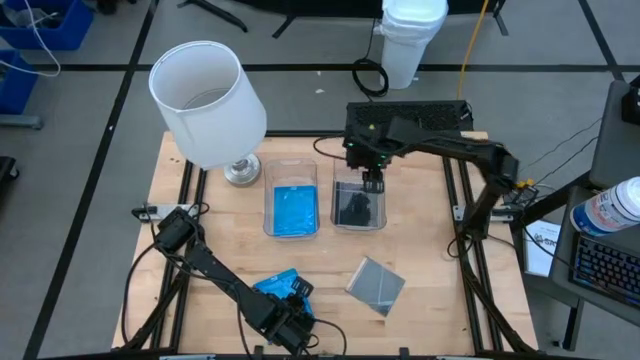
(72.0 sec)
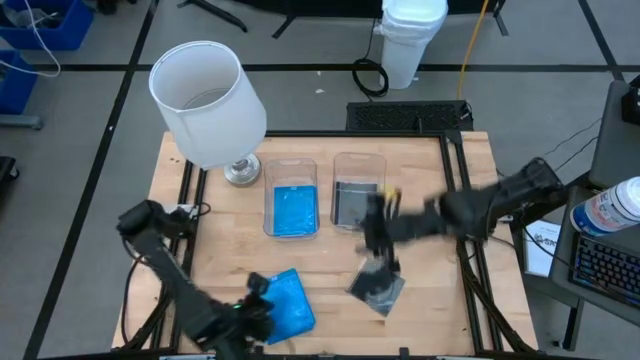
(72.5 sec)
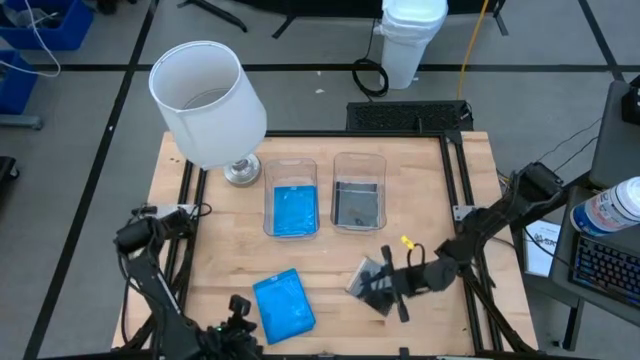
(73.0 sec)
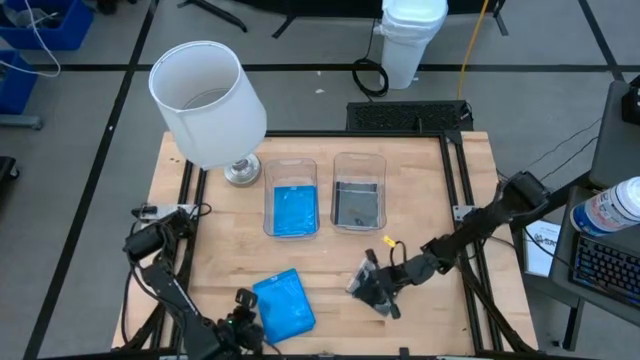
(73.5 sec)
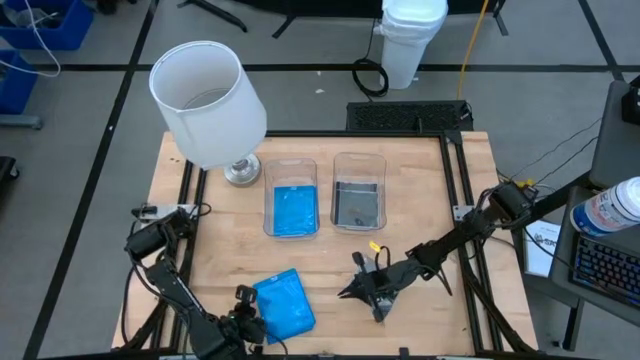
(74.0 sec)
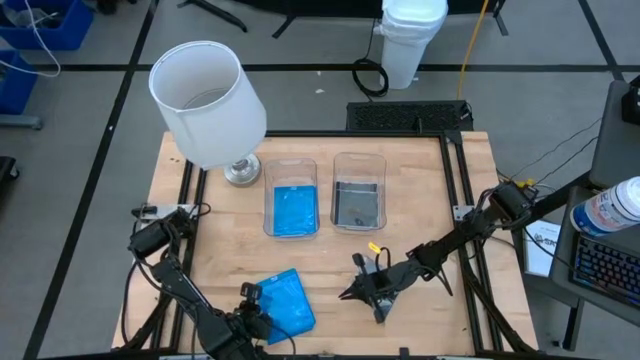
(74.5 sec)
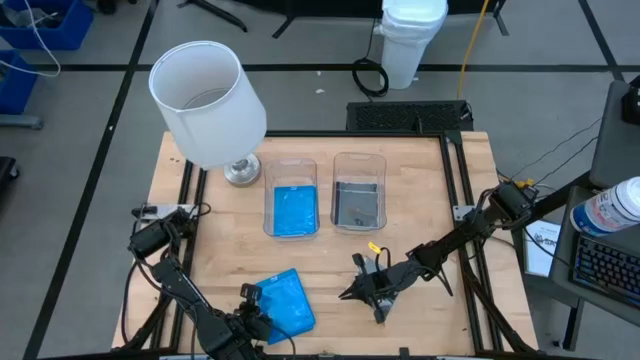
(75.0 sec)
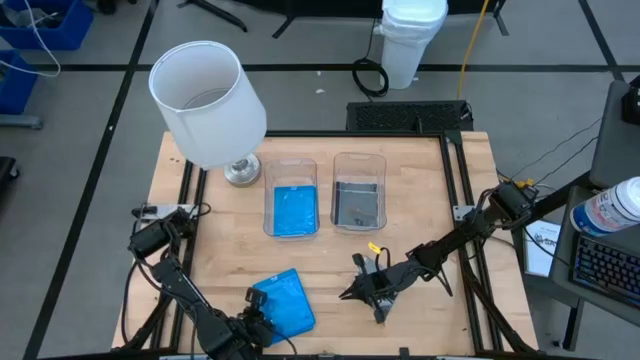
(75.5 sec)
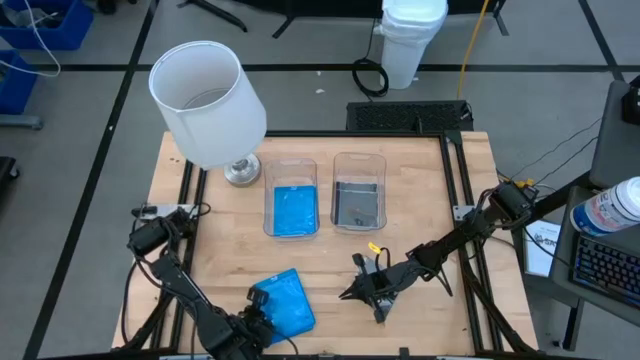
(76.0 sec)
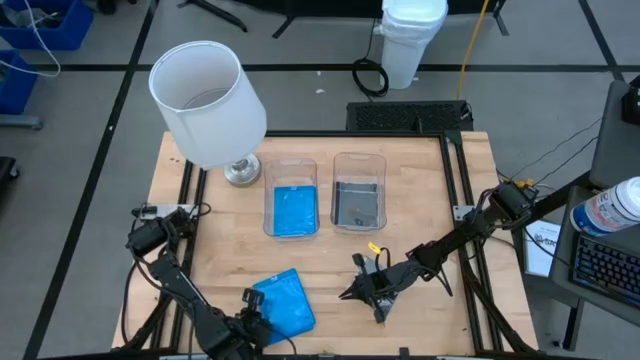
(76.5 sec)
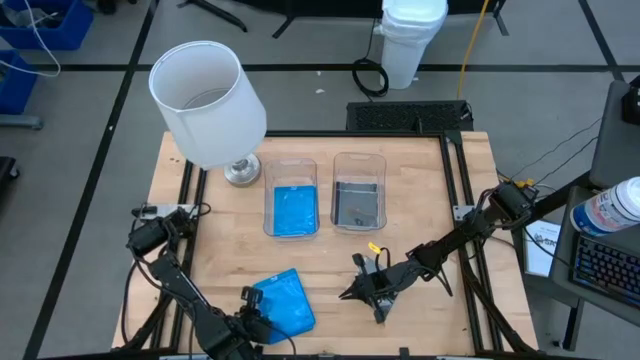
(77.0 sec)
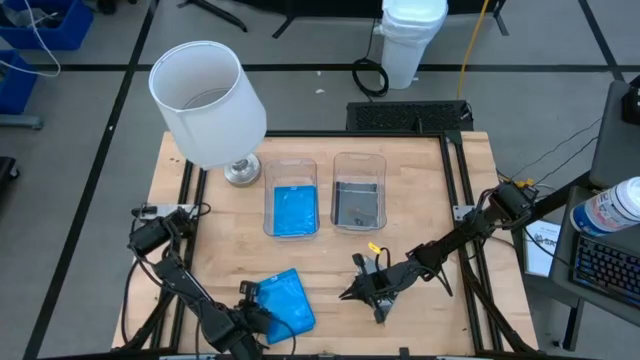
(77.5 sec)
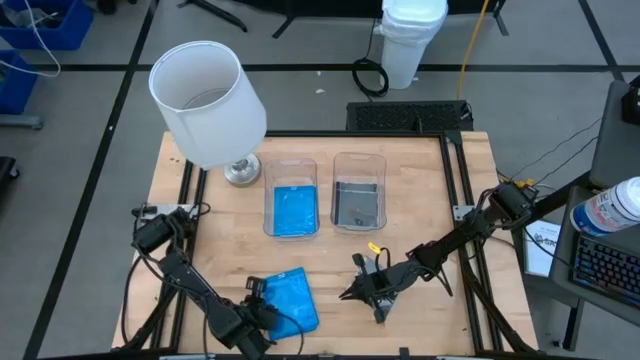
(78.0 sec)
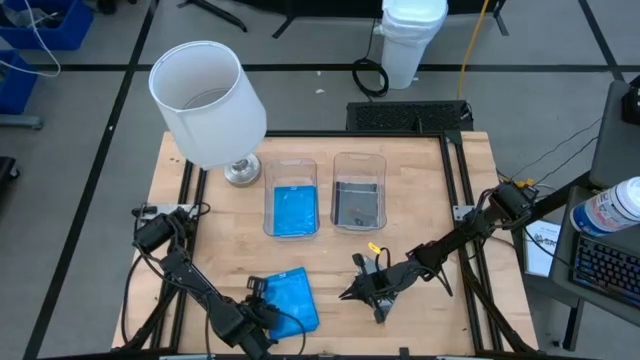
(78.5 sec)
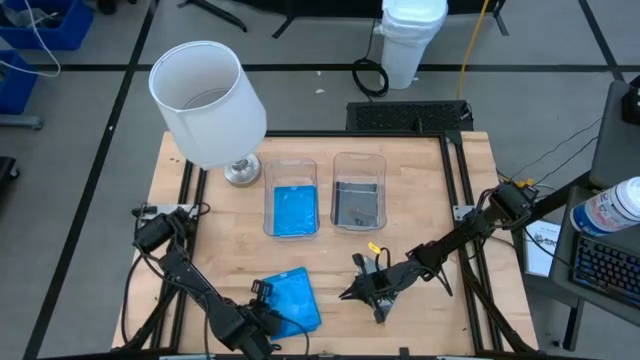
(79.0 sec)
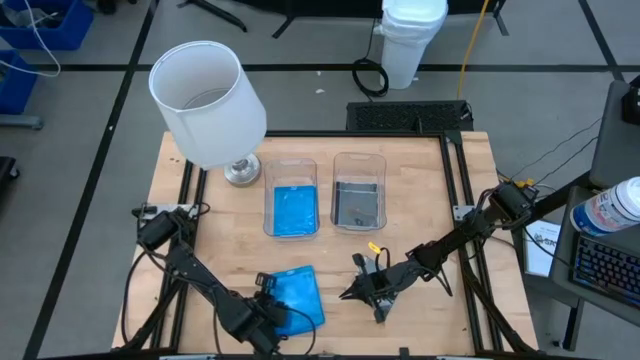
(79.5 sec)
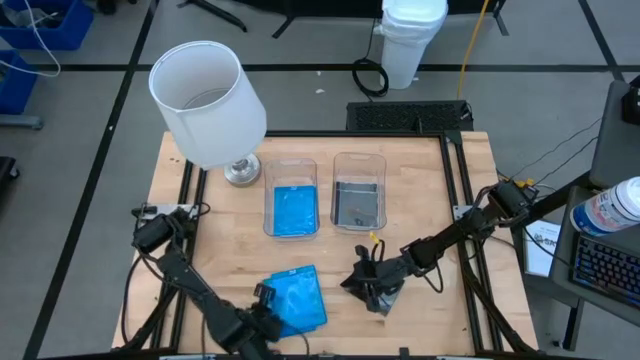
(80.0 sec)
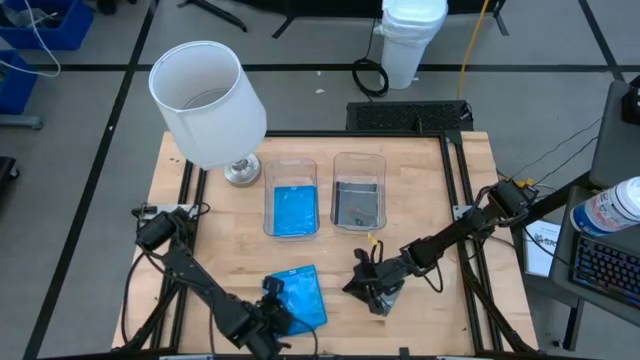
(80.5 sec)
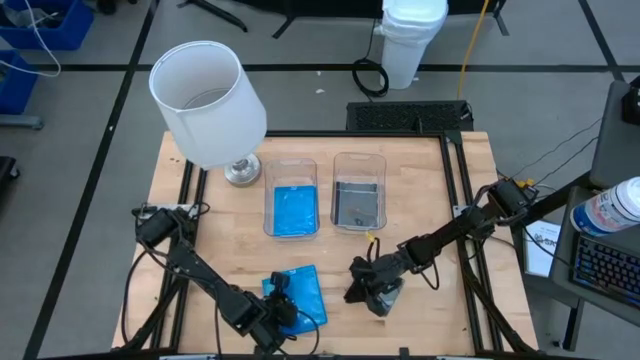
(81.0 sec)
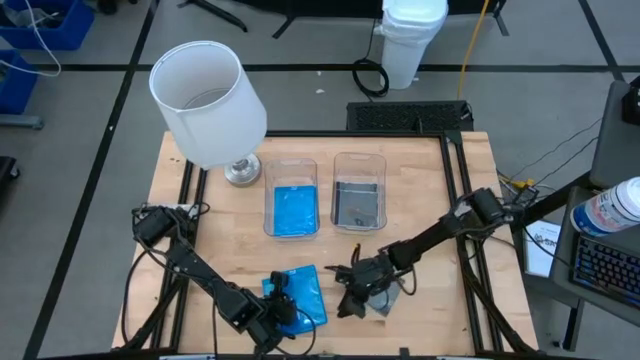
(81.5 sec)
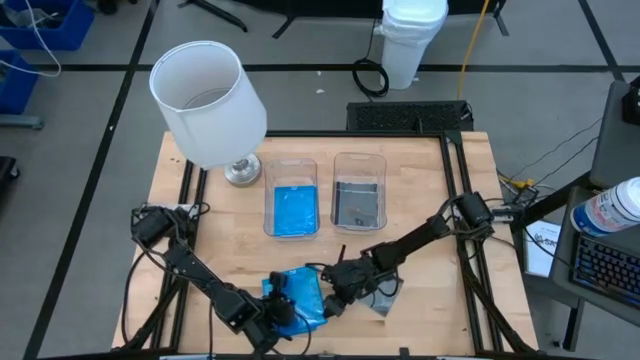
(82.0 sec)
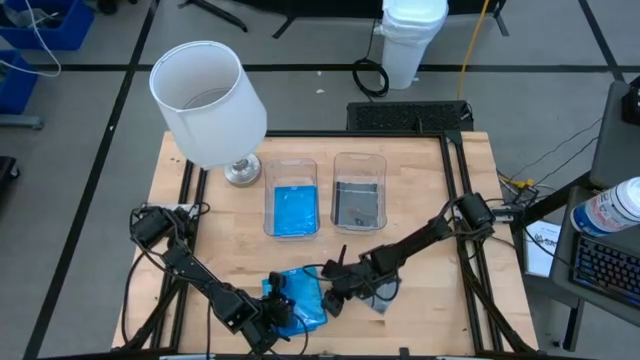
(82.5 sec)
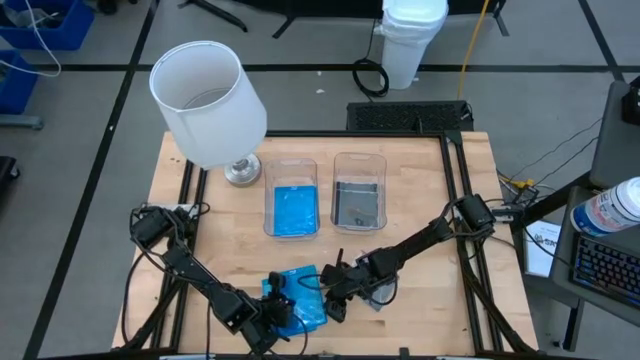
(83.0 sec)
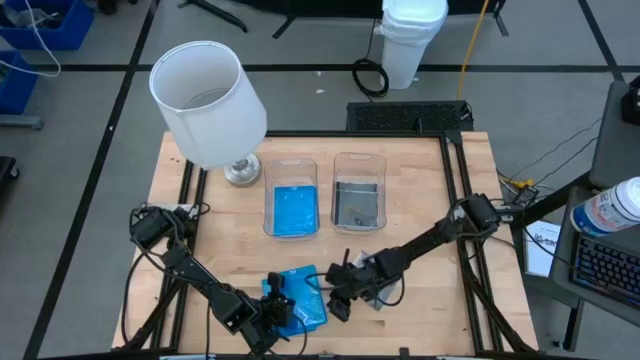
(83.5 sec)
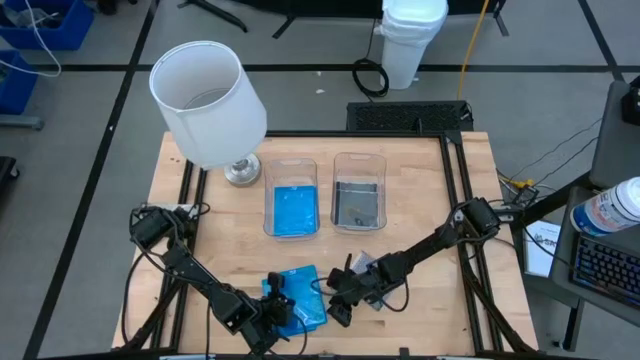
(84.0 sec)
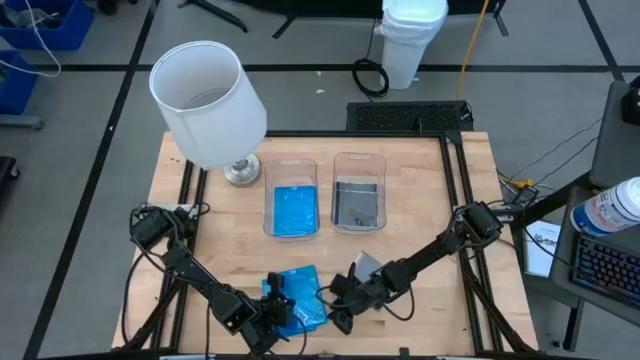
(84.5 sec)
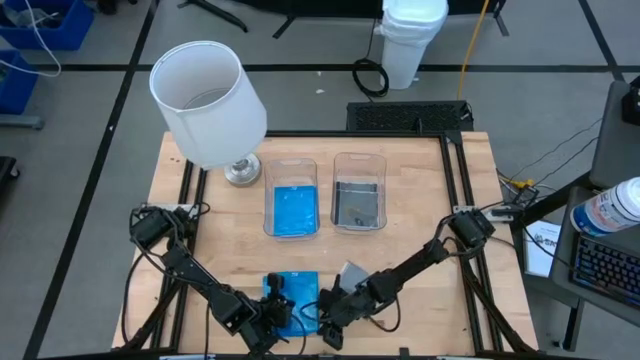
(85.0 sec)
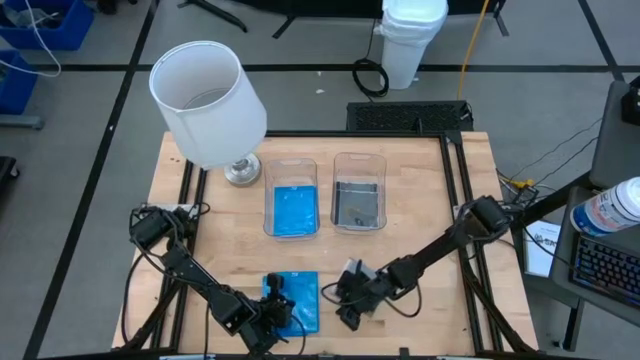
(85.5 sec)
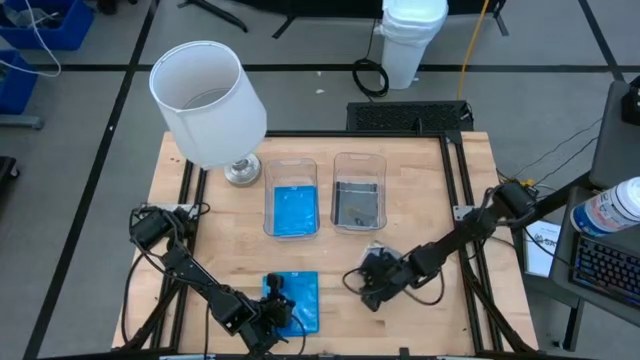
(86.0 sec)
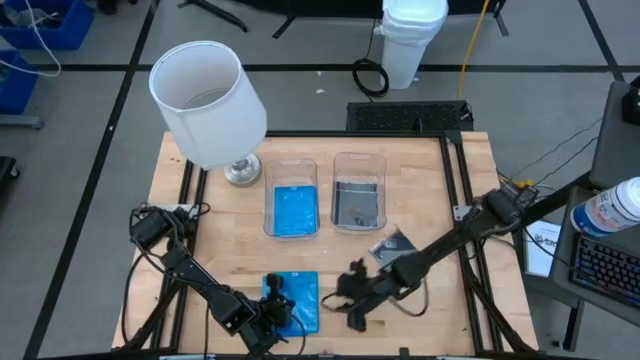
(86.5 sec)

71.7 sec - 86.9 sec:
Task: Pick & place jewel cases by type
Put the blue CD case into the left transparent bin

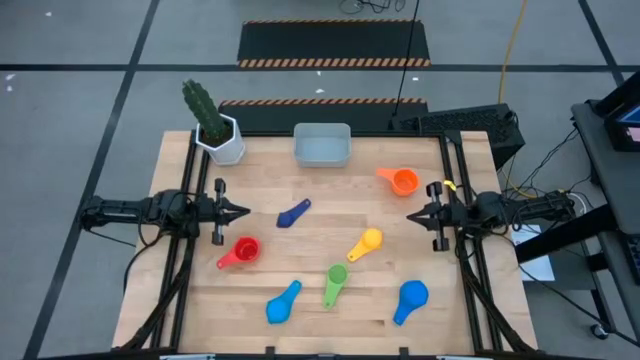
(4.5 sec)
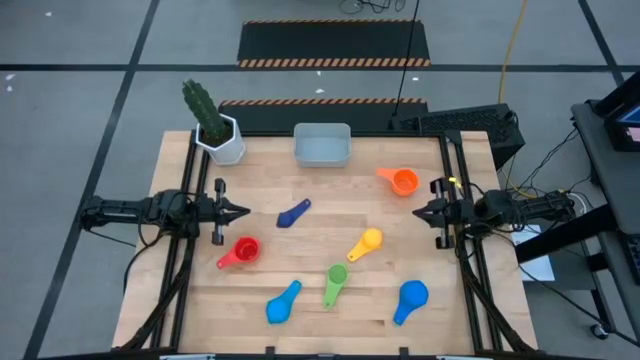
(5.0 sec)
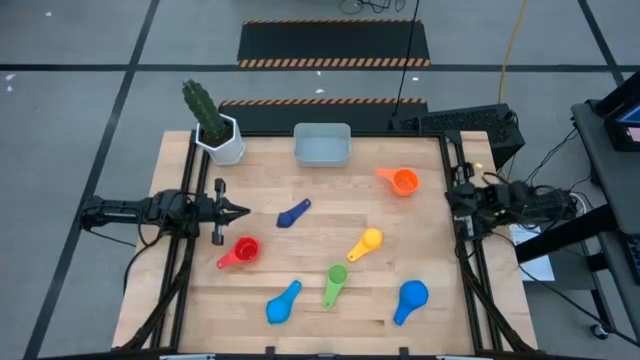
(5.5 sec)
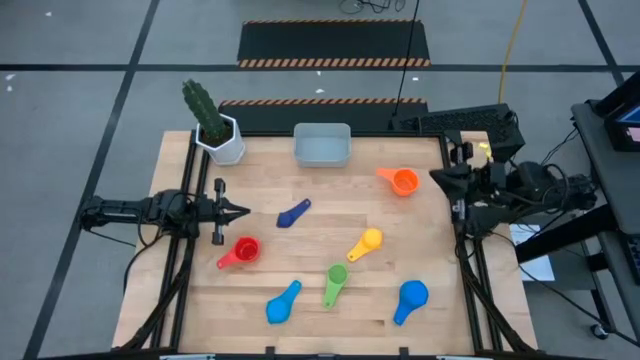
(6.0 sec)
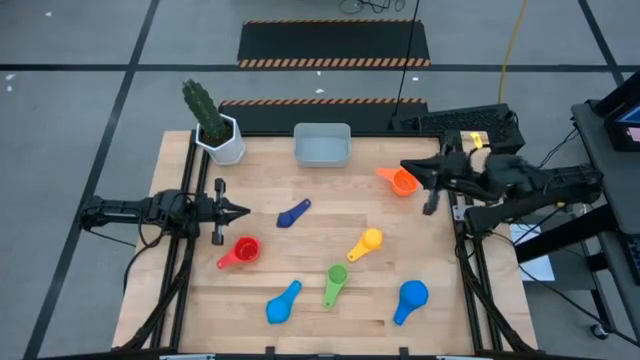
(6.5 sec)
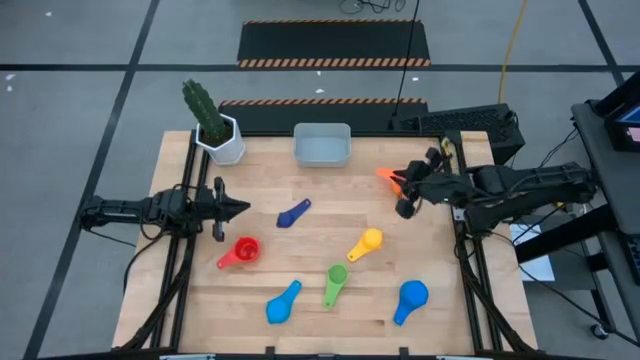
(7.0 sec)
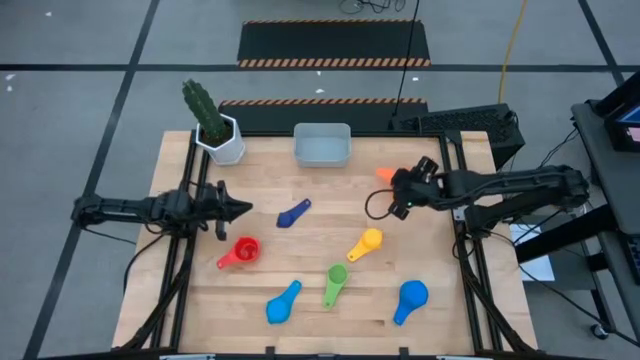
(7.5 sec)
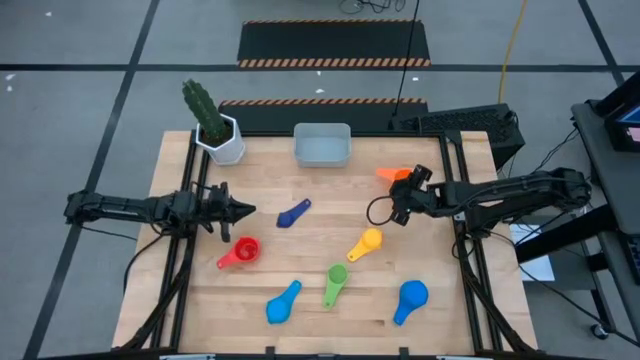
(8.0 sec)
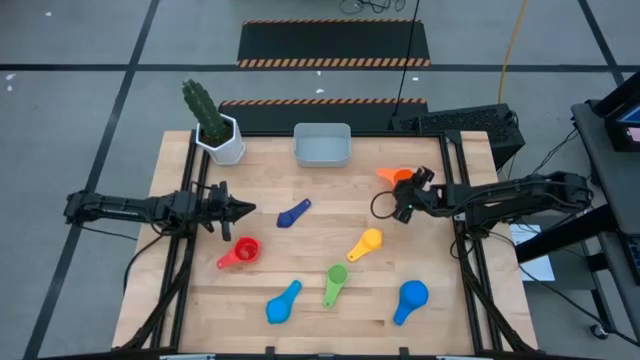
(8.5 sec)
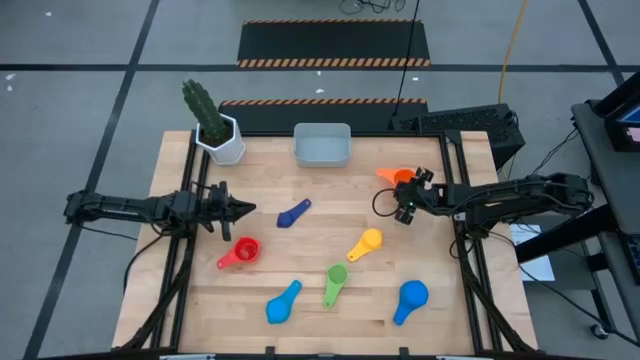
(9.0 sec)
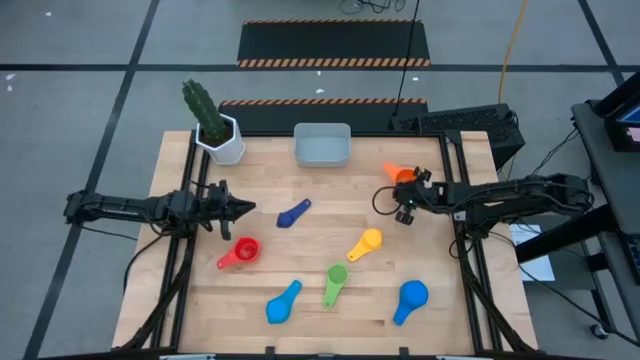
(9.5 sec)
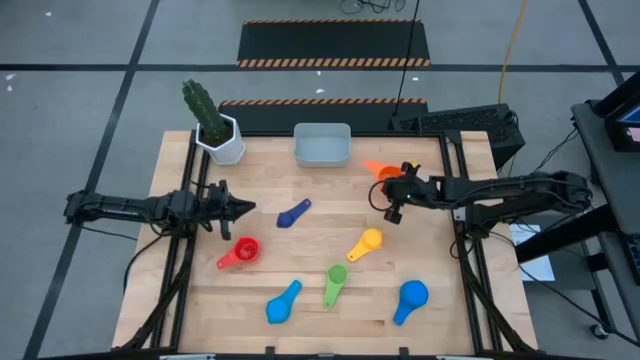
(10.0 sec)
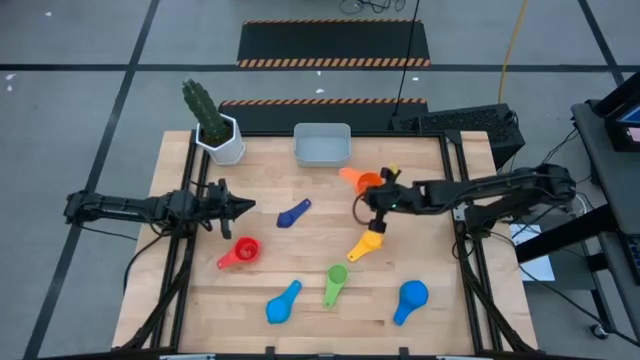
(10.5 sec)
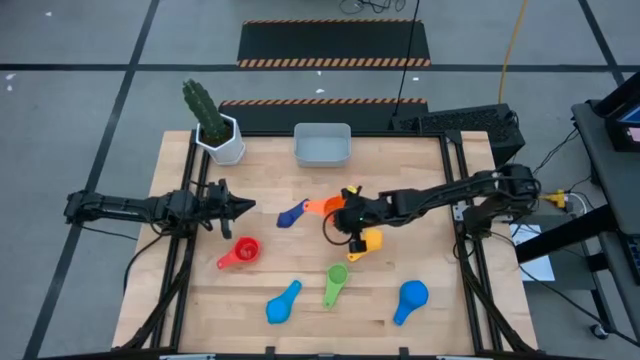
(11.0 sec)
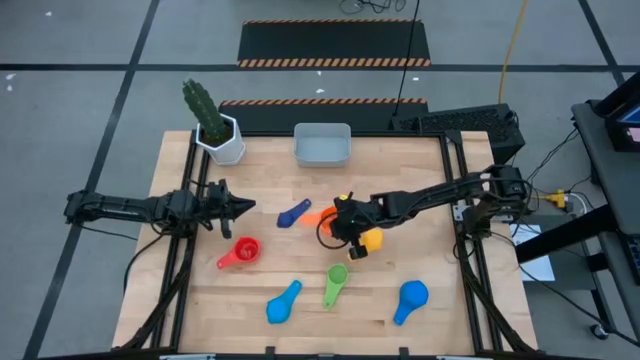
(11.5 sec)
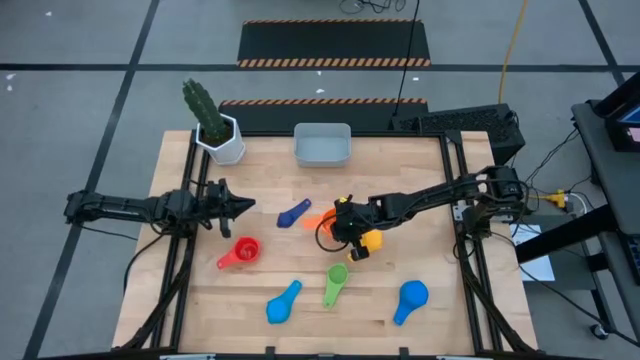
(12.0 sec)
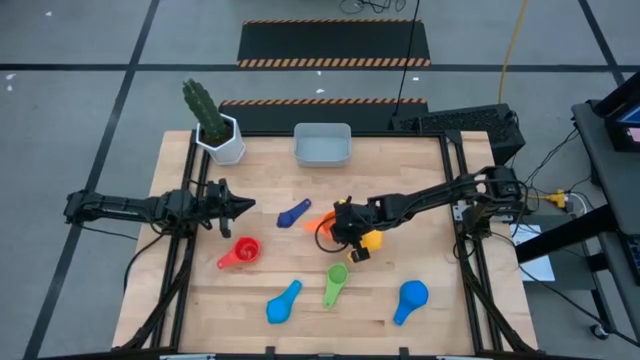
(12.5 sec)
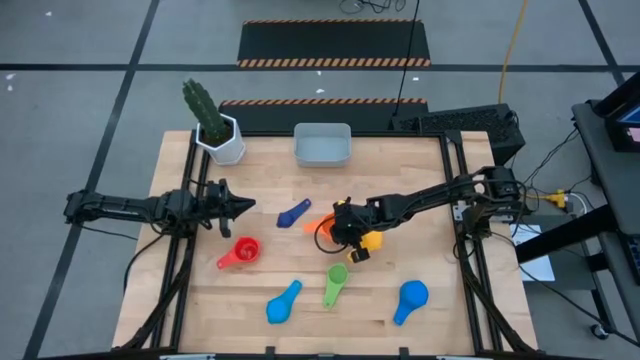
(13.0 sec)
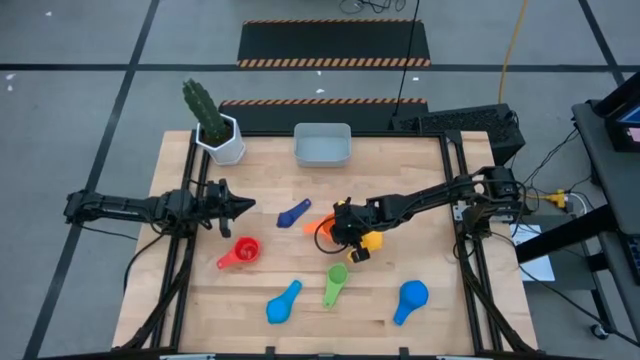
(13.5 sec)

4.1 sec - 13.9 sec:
Task: Nest measuring cups in basket
Move the orange measuring cup to the center
